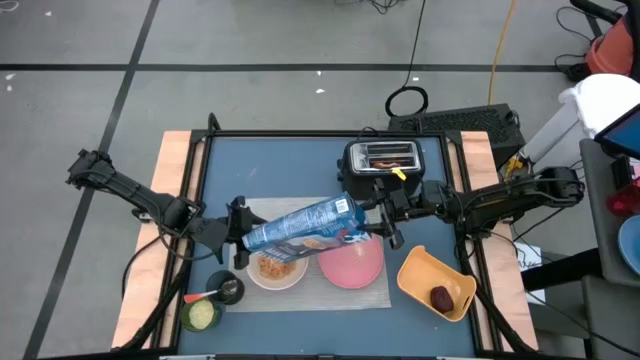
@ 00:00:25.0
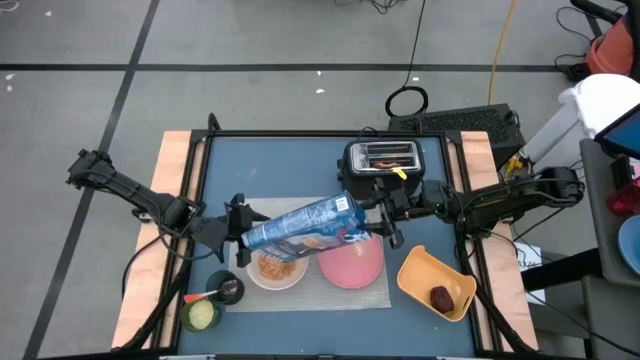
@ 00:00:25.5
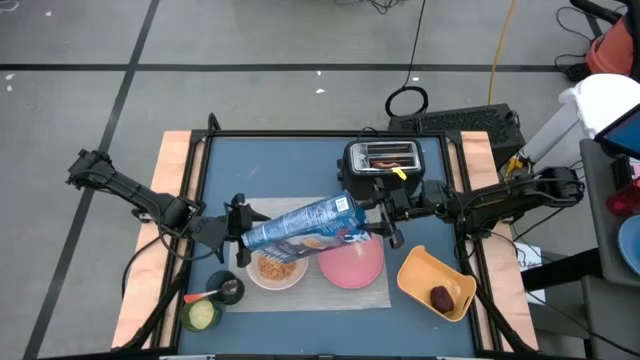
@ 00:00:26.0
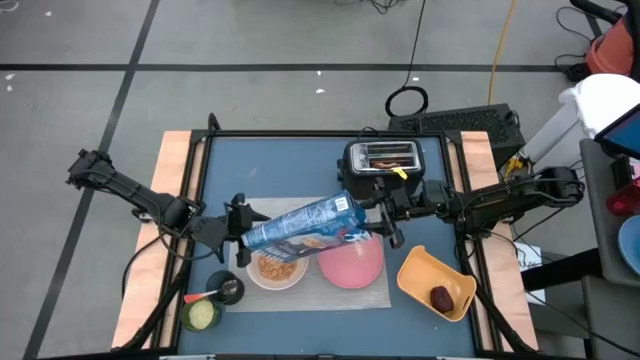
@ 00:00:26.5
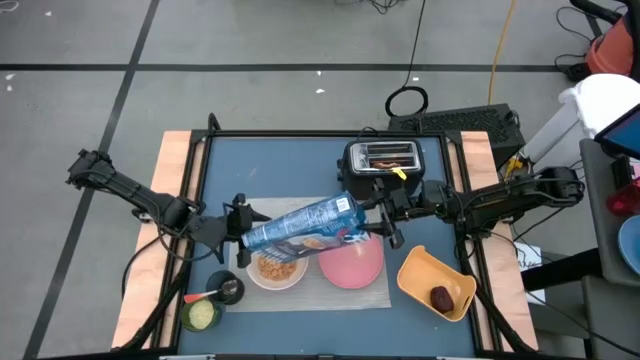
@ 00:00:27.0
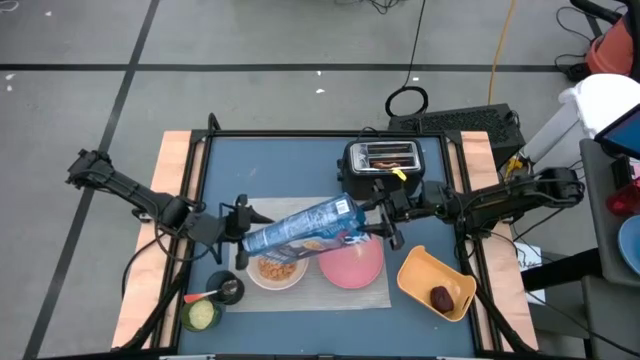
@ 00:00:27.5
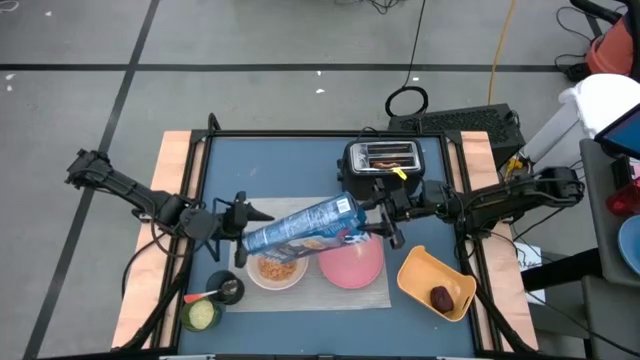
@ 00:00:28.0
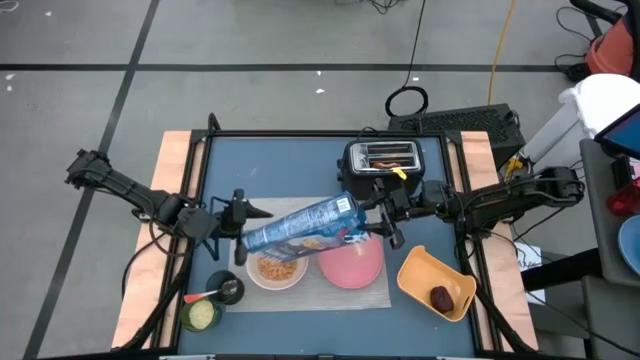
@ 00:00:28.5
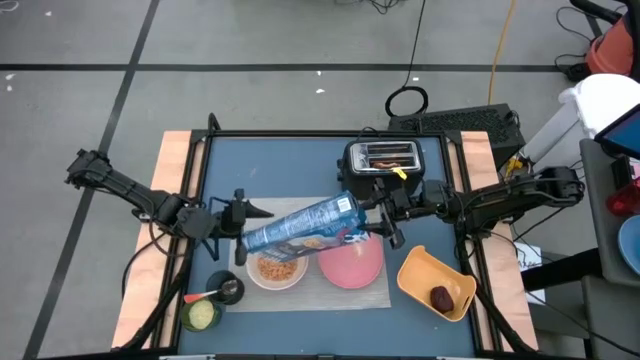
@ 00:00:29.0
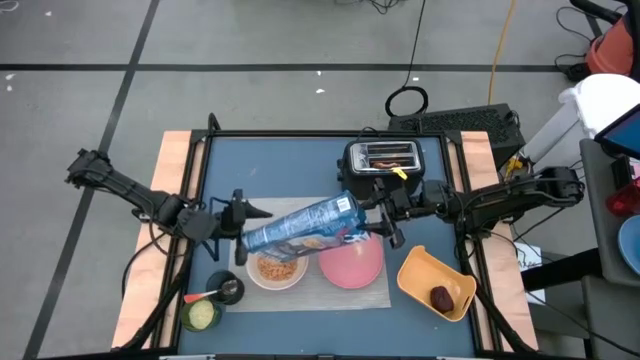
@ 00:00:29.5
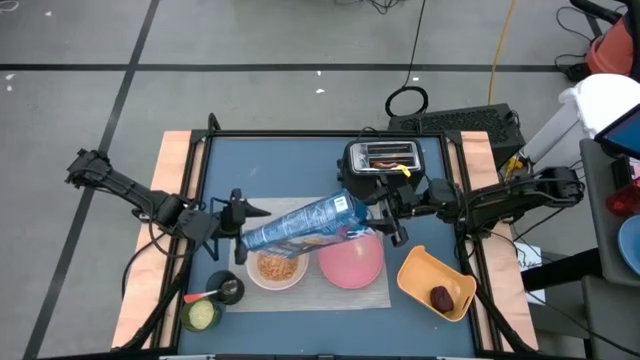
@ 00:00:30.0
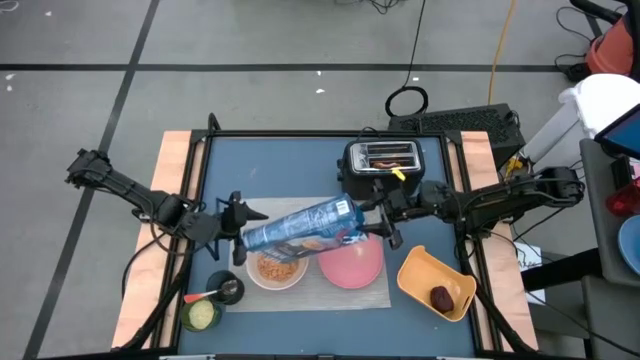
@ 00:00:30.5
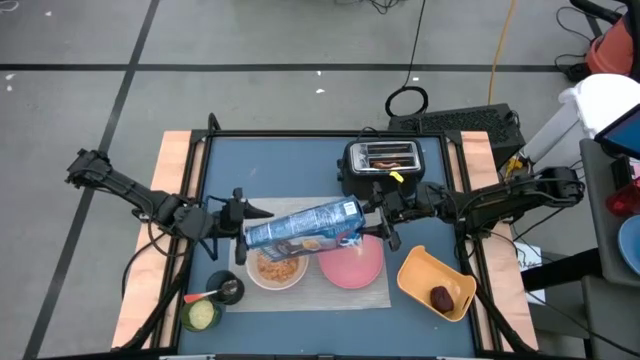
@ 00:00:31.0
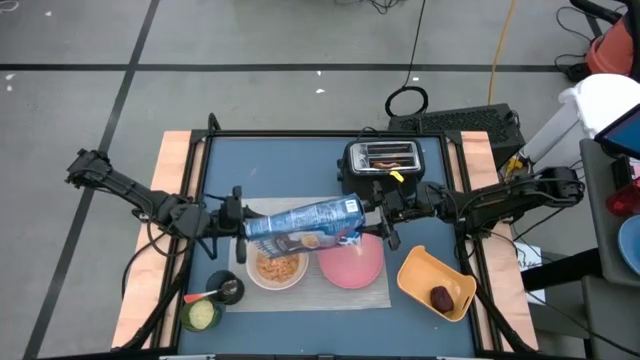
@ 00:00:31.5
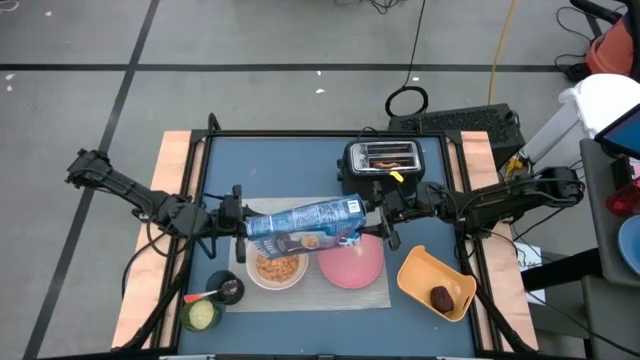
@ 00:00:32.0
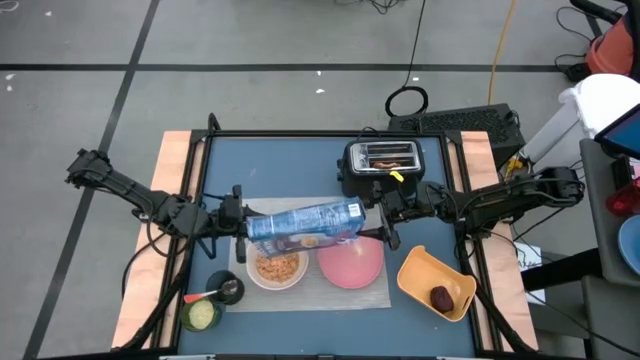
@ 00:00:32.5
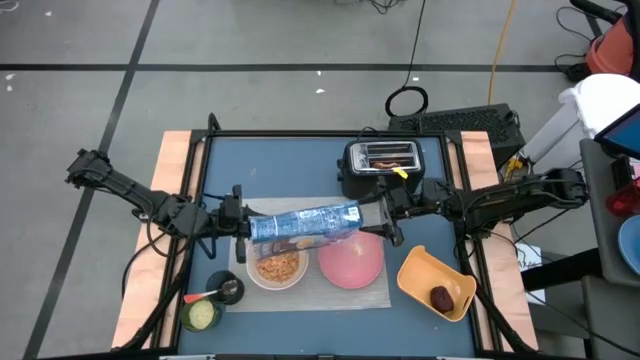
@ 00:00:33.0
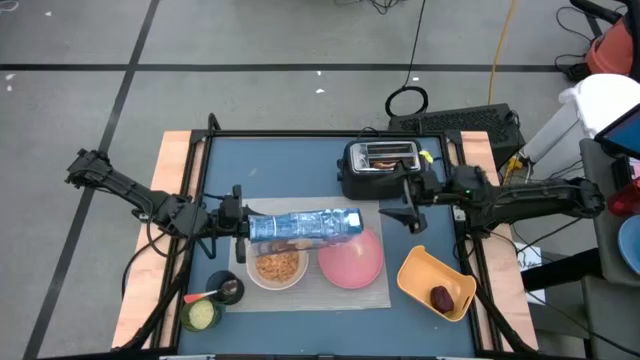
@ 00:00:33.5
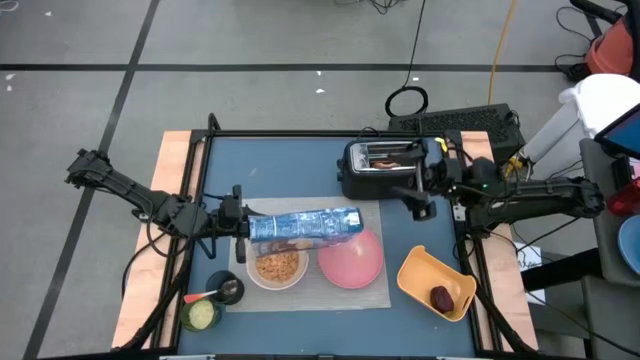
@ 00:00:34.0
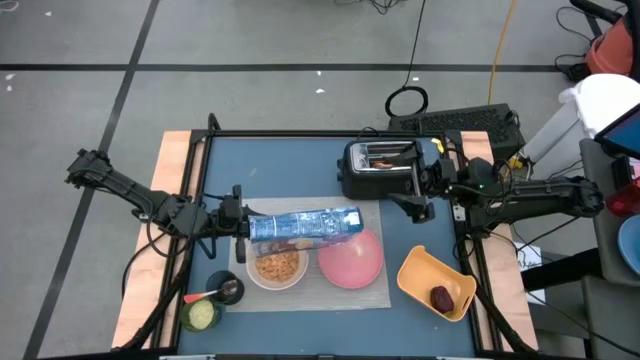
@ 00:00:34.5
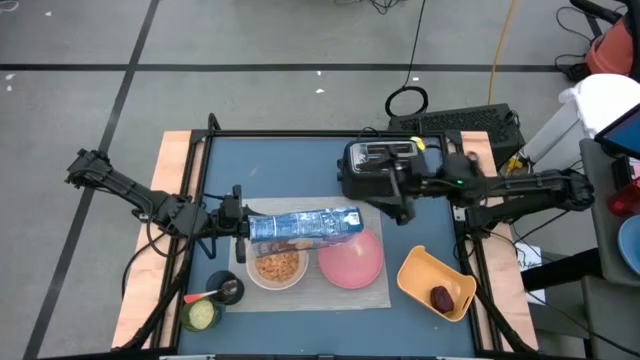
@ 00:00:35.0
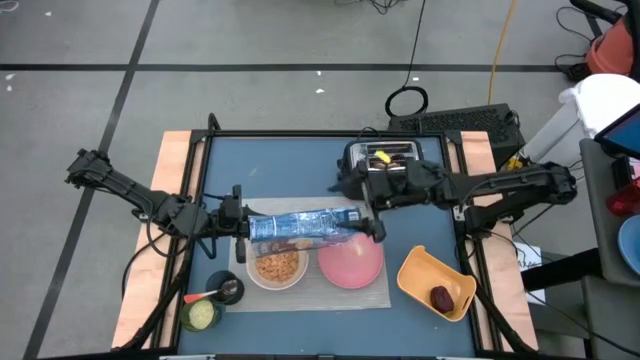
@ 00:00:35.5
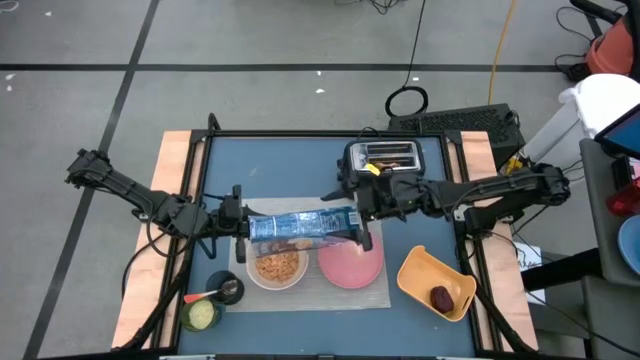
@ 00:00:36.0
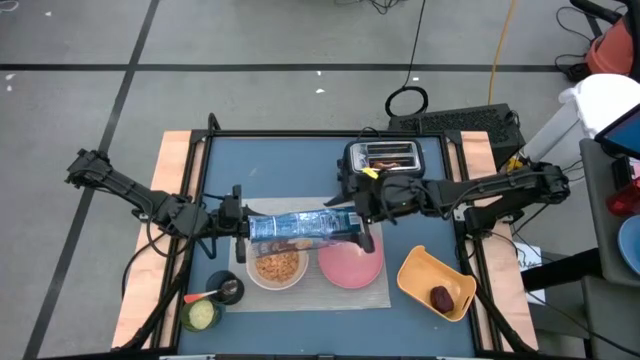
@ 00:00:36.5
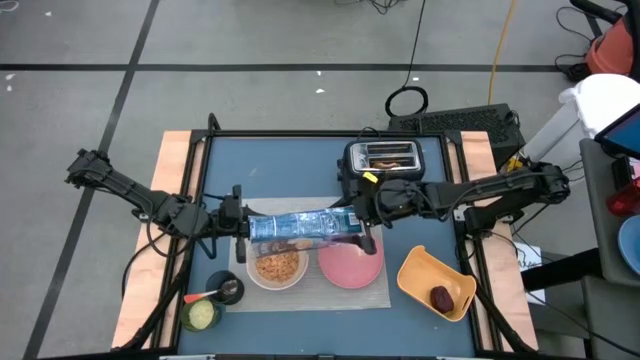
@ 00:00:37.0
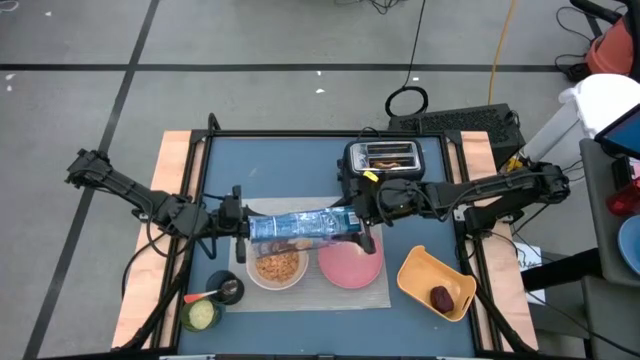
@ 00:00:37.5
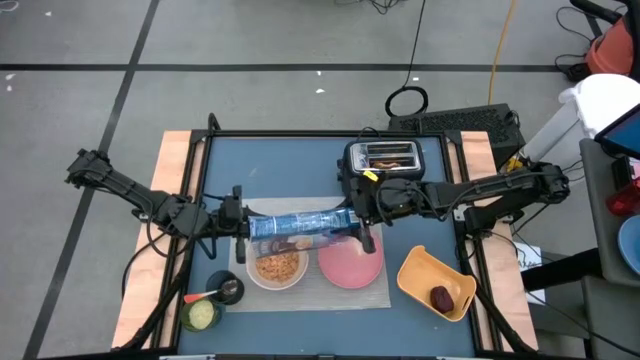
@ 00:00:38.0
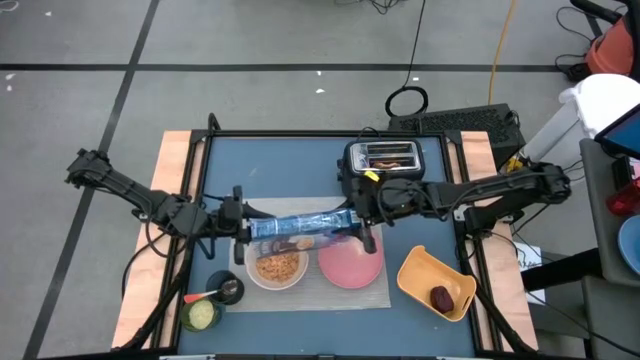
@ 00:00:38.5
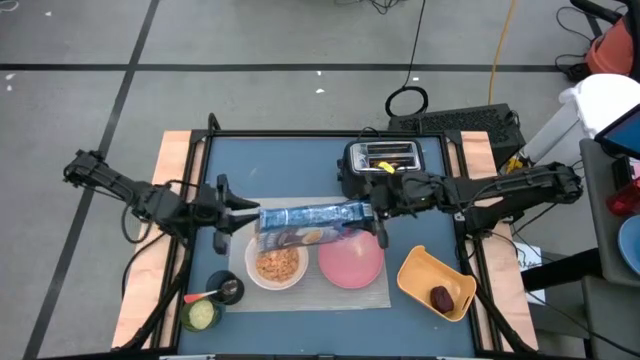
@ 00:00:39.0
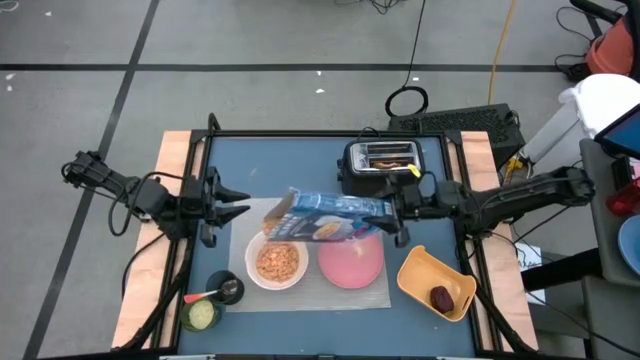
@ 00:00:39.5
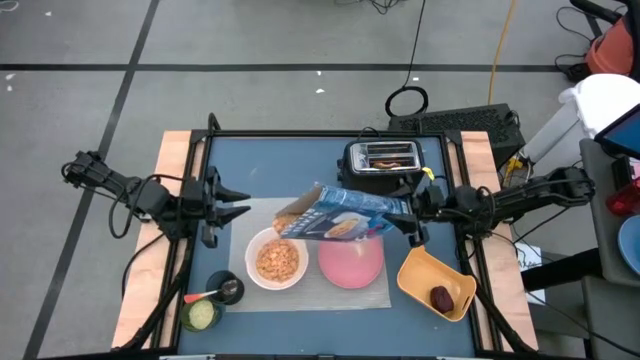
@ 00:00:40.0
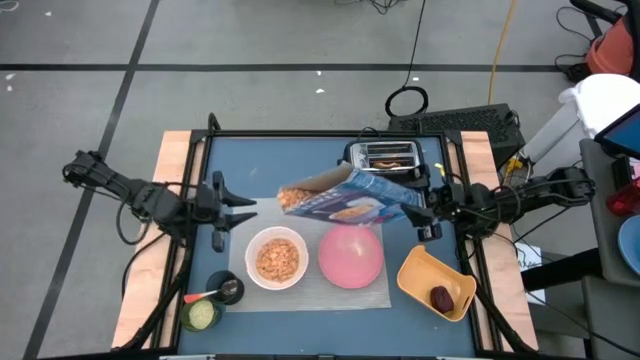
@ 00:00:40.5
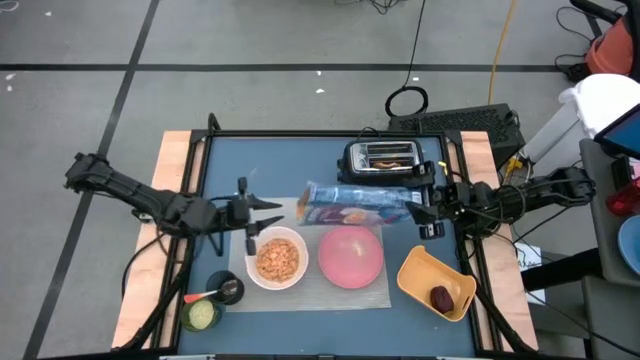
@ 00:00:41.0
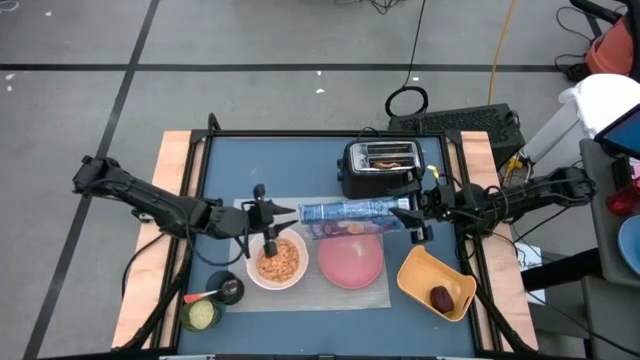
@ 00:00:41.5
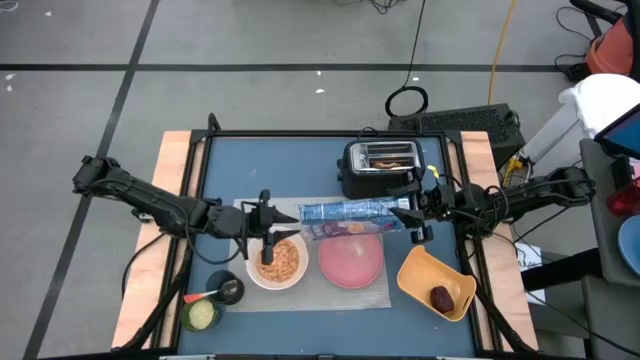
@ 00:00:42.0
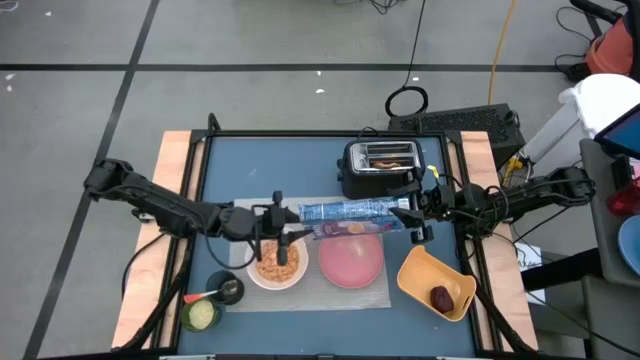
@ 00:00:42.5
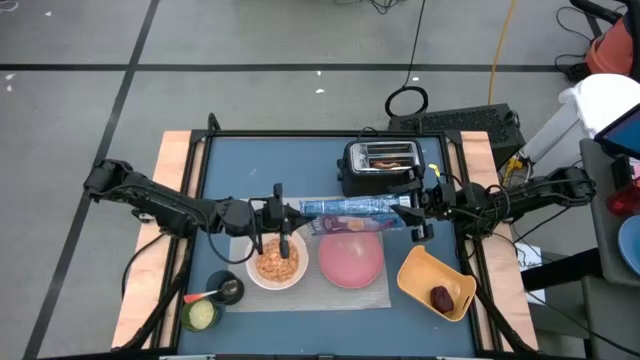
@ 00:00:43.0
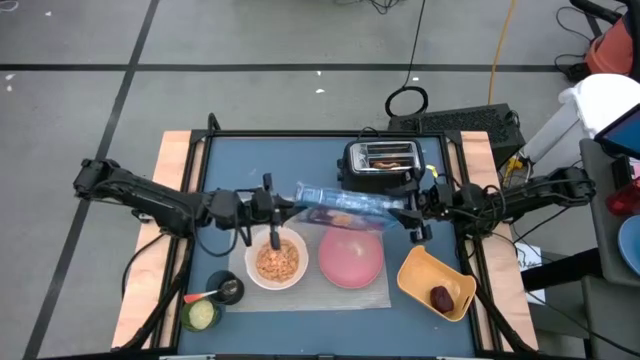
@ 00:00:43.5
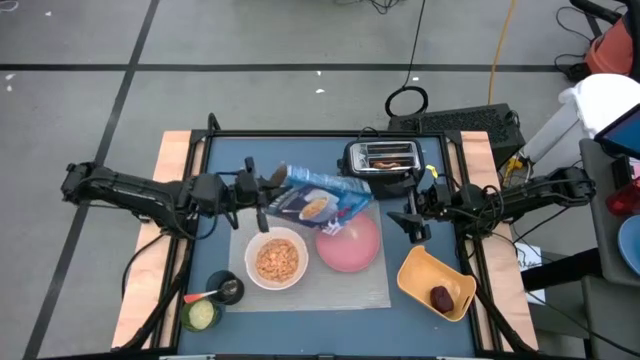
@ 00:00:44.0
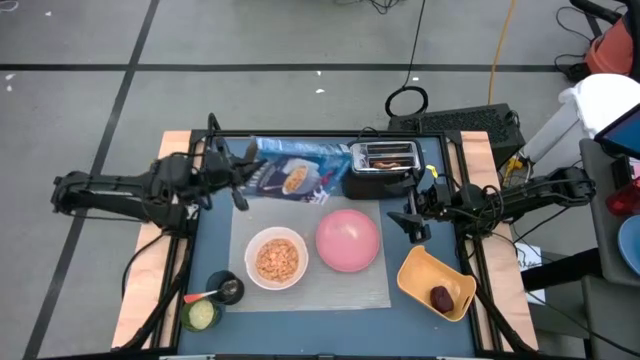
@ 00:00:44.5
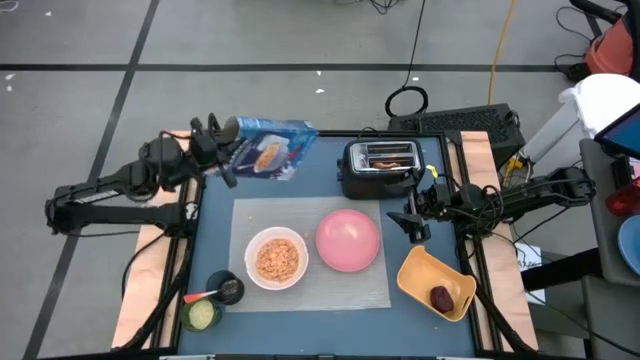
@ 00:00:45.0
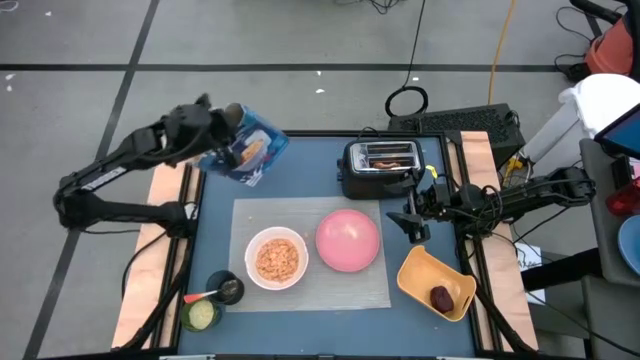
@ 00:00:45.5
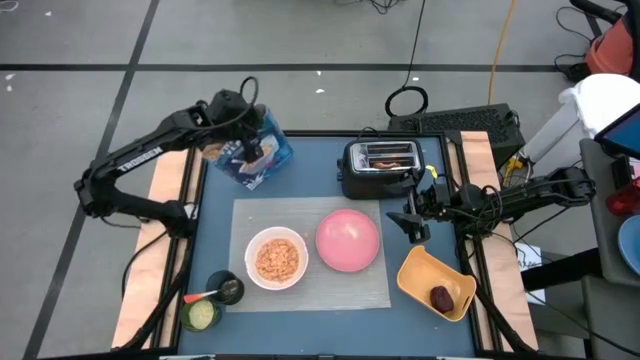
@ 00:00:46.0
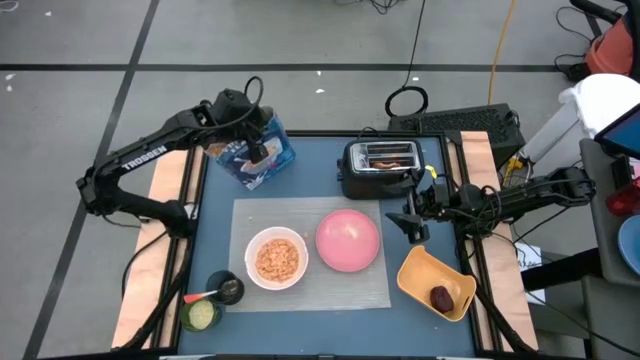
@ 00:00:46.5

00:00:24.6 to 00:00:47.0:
Task: Arrange a breakfast setting
Pour the cereal into the white bowl
